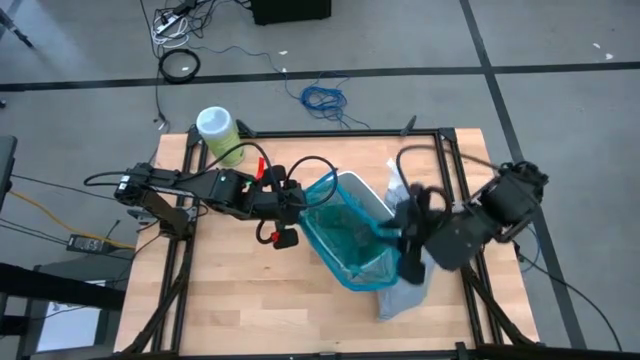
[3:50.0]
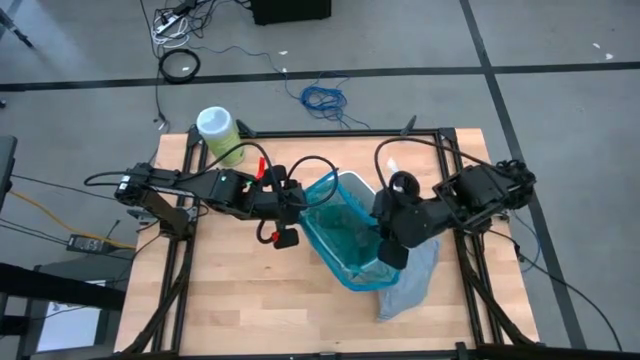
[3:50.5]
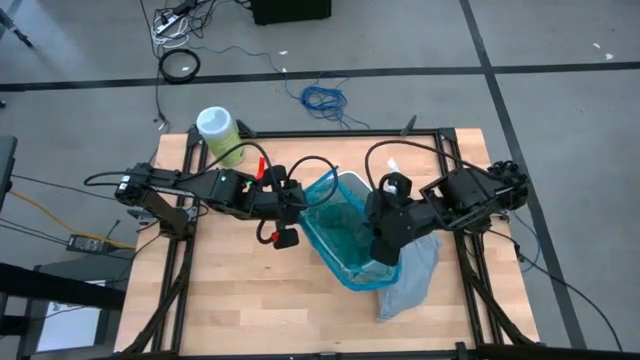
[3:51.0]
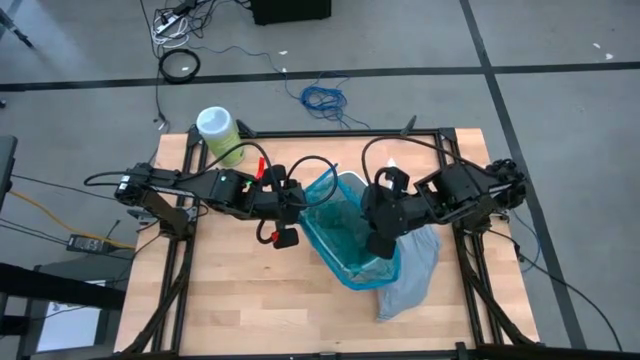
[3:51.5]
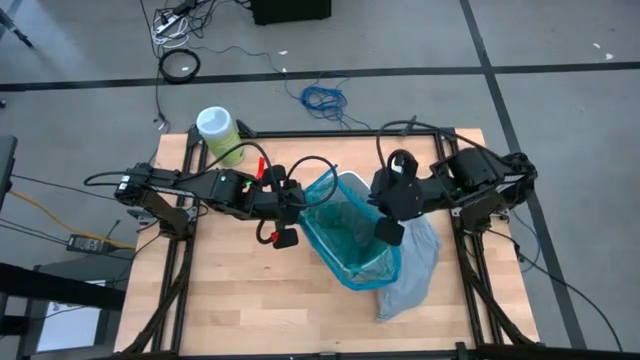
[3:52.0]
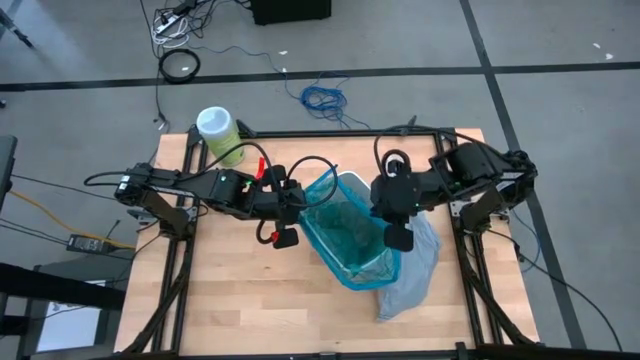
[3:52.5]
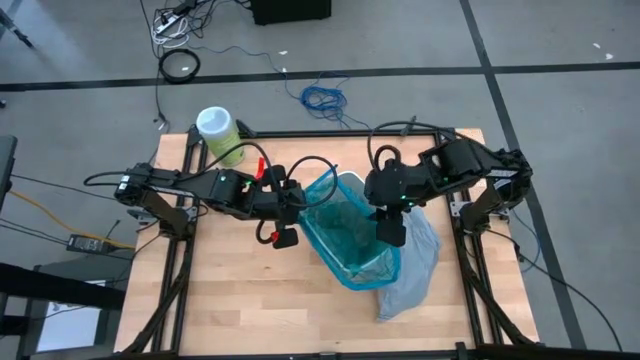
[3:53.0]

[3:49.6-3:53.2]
Task: place trash/remove bag and relplace
Put the new blue trash bag into the trash bin

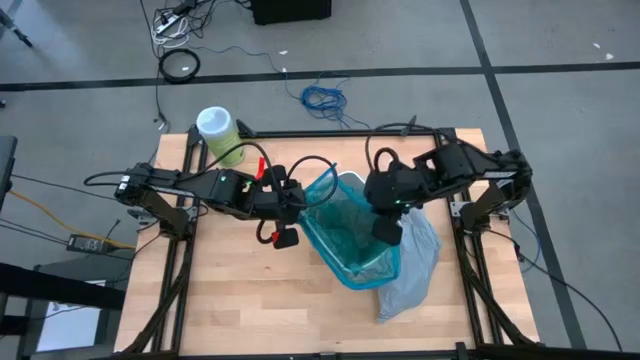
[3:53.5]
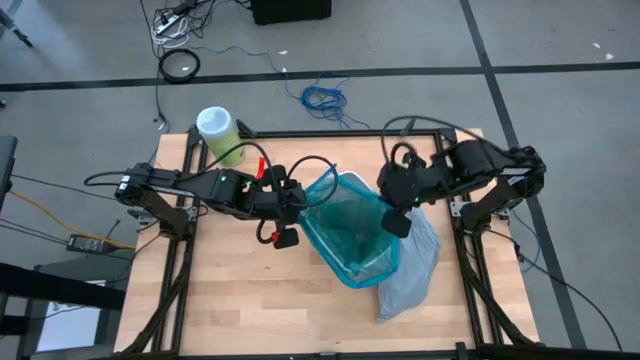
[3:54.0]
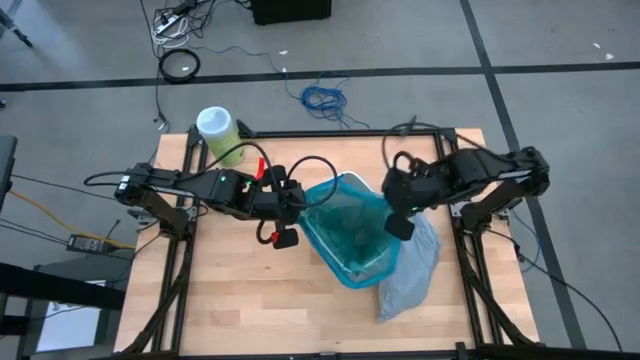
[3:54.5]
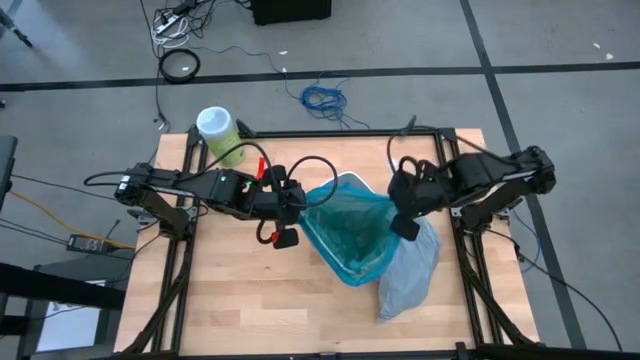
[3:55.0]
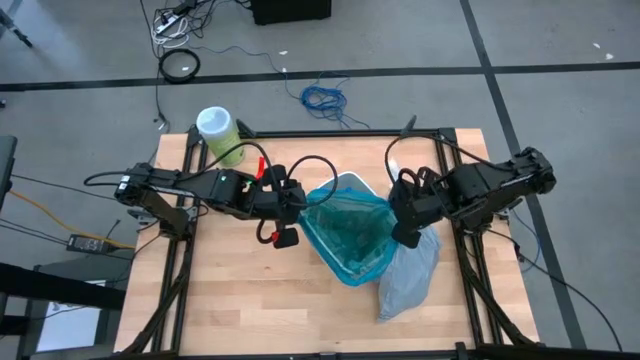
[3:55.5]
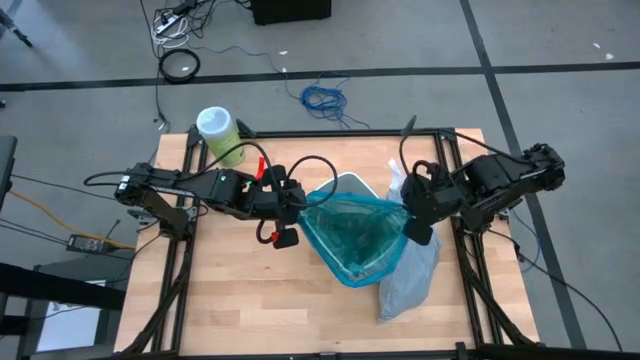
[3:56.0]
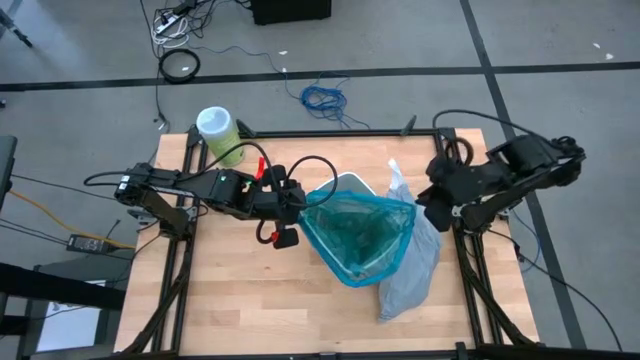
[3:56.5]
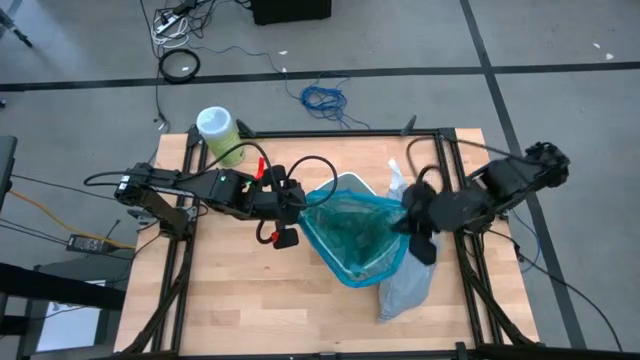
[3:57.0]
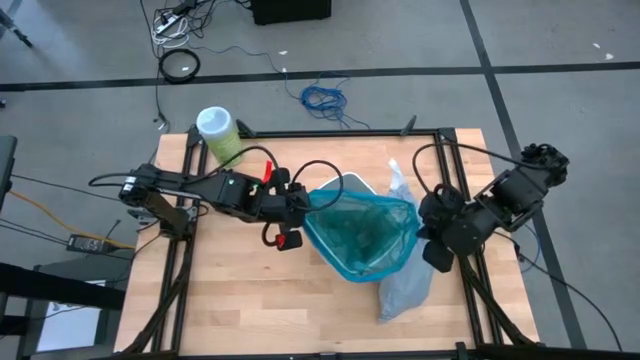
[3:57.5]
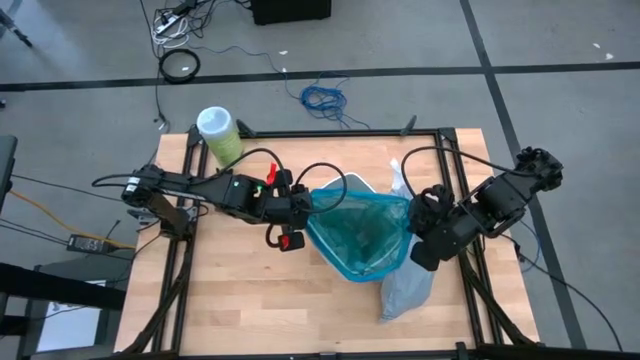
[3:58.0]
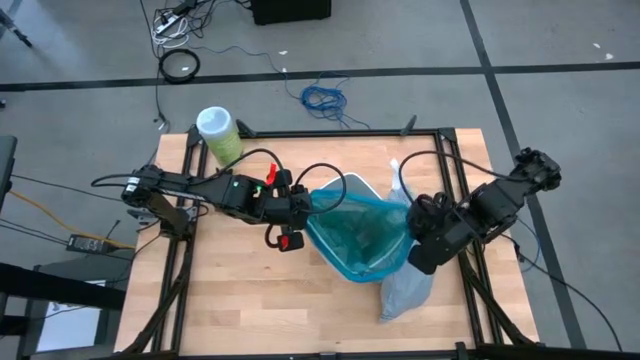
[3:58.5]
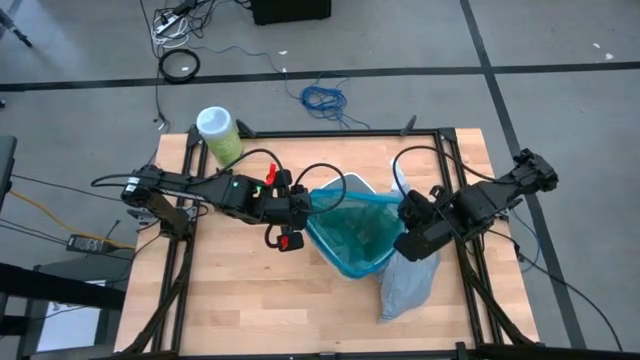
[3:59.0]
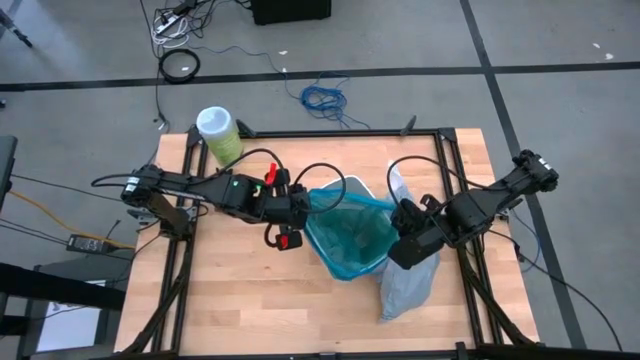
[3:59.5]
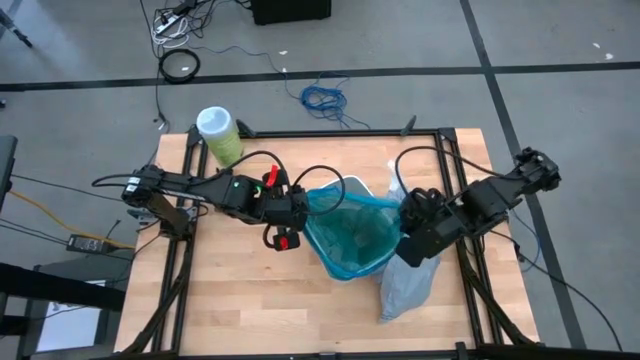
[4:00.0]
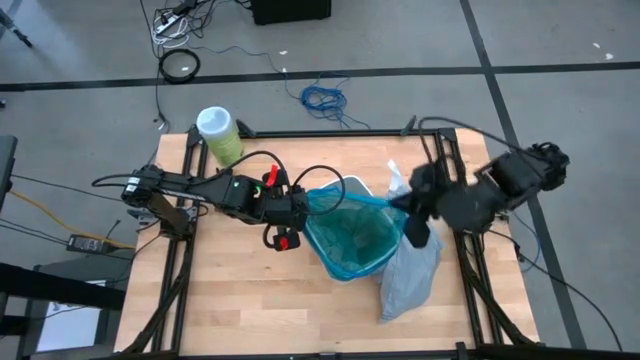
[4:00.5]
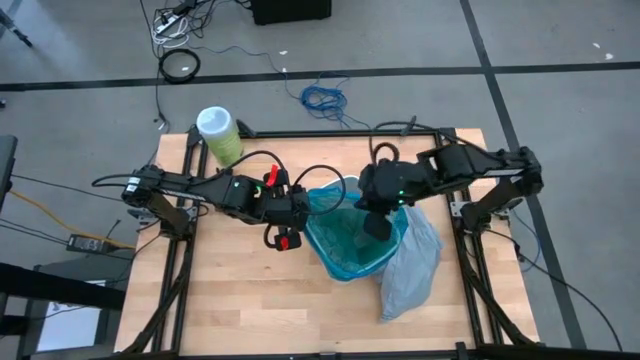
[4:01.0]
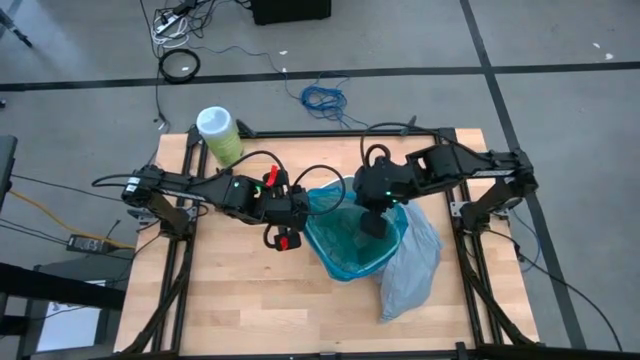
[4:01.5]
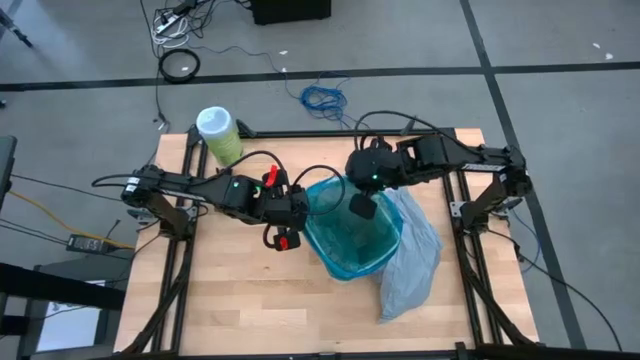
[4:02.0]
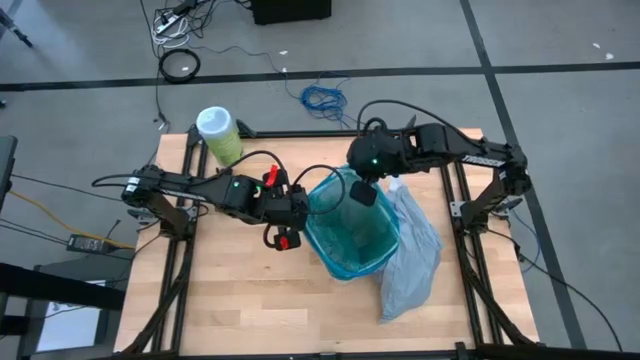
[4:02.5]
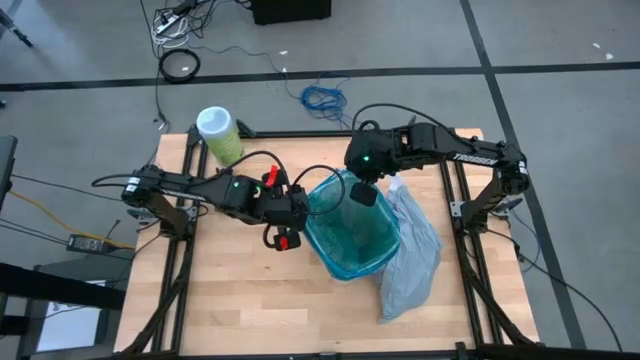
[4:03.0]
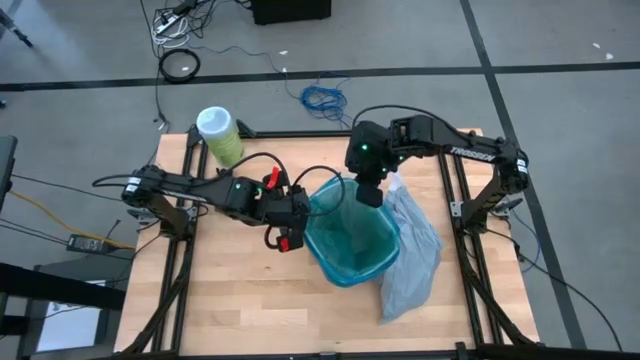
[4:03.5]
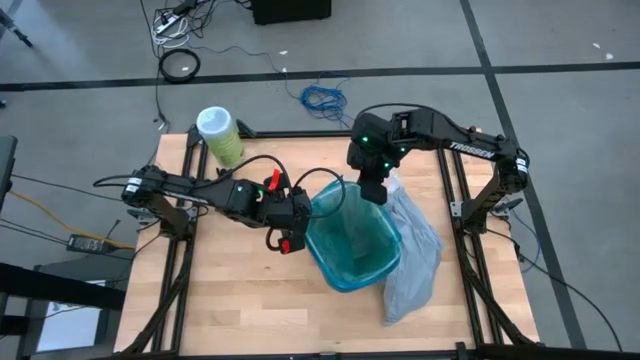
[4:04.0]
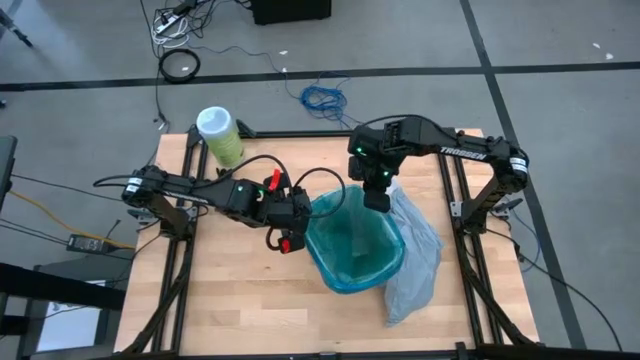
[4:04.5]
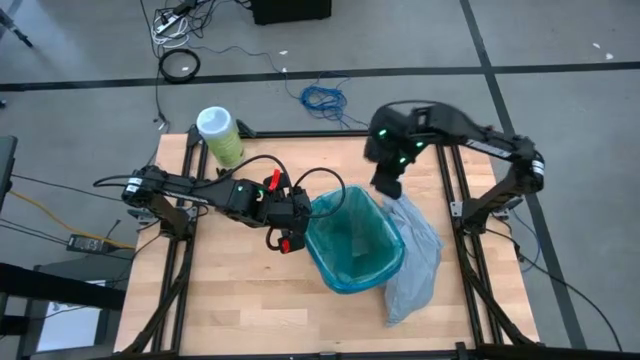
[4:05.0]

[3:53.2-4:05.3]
Put the new blue trash bag into the trash bin
